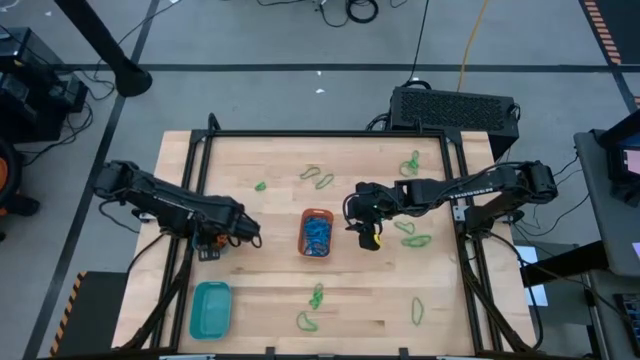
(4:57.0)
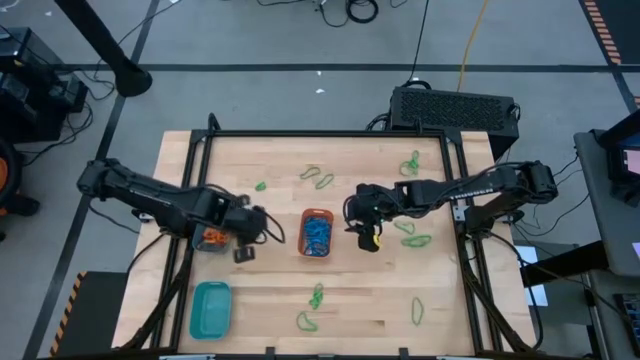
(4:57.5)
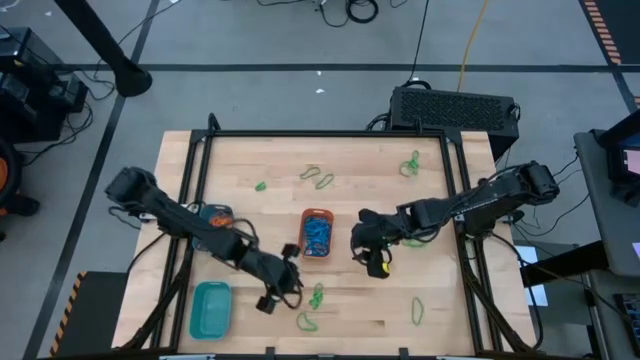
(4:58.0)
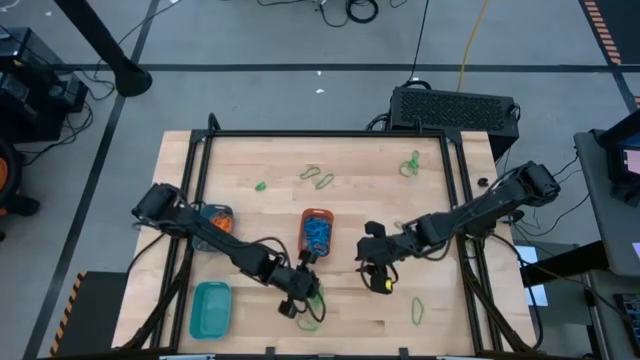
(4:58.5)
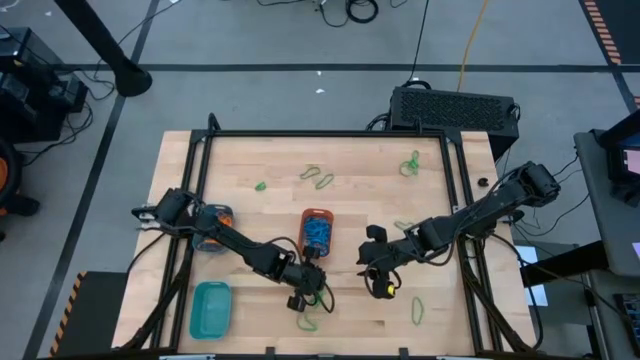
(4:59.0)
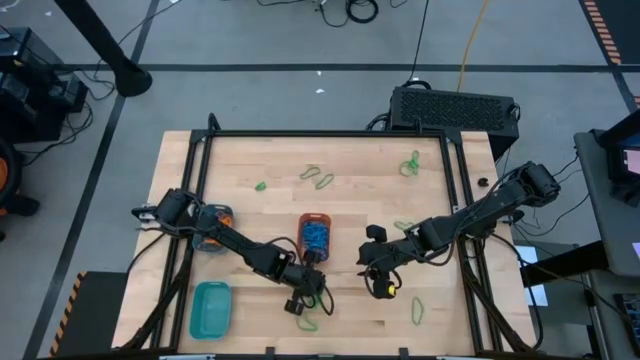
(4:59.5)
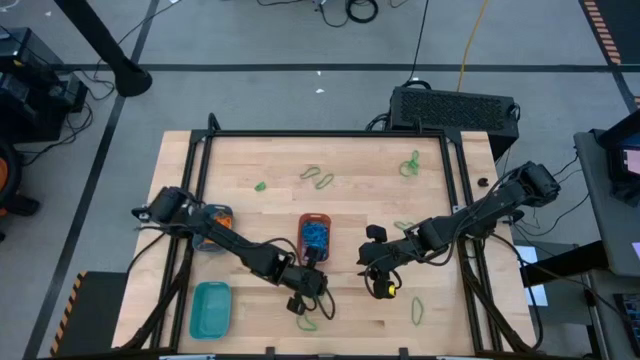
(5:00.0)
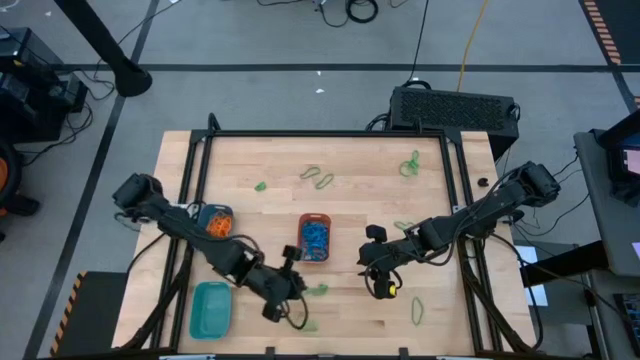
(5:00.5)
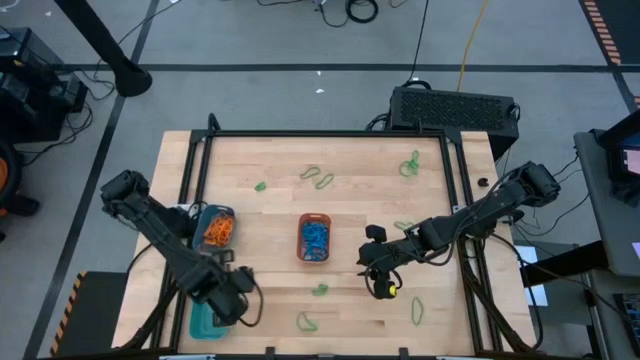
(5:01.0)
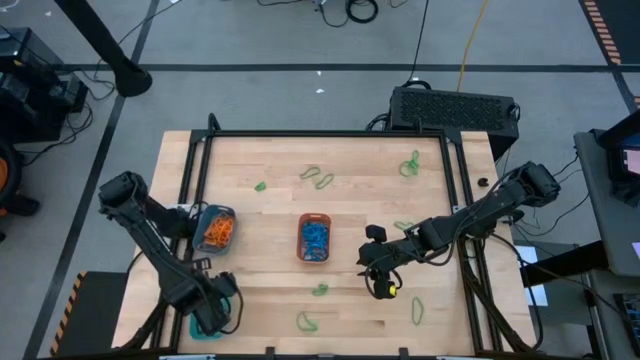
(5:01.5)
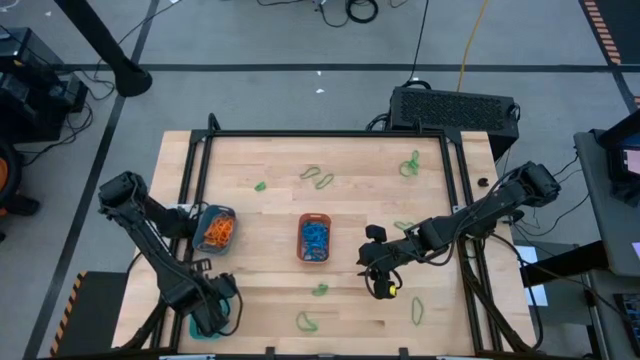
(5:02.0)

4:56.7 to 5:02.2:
Task: Sort rubber bands into baskets
Put the green rubber band into the green bin

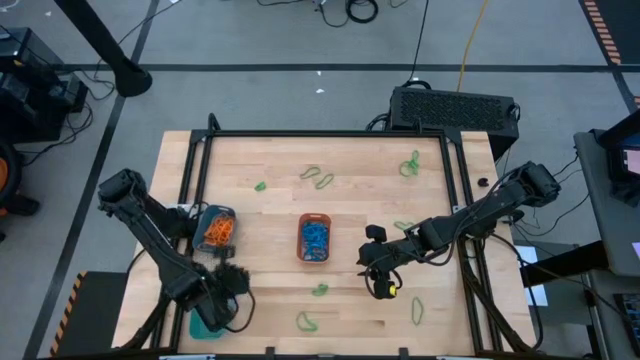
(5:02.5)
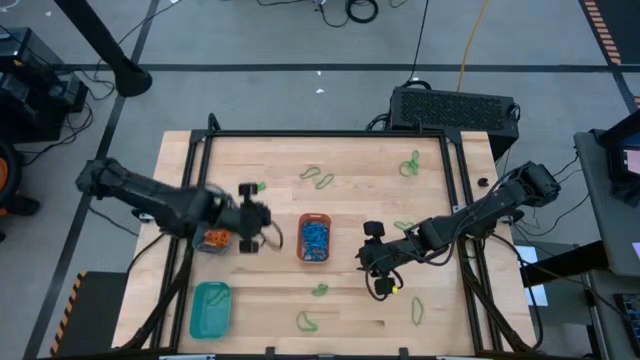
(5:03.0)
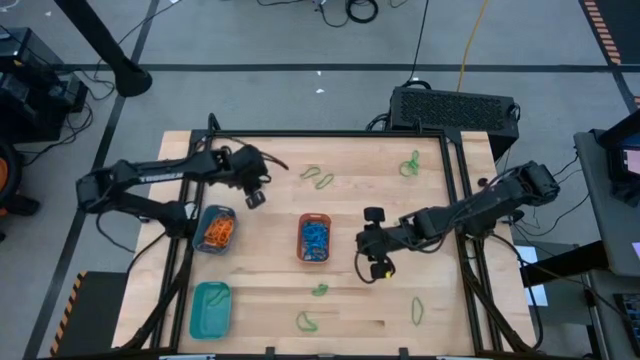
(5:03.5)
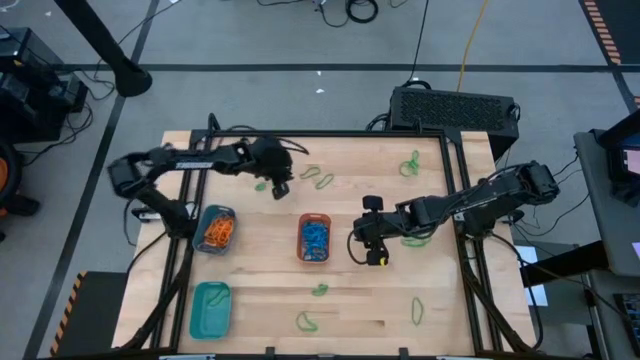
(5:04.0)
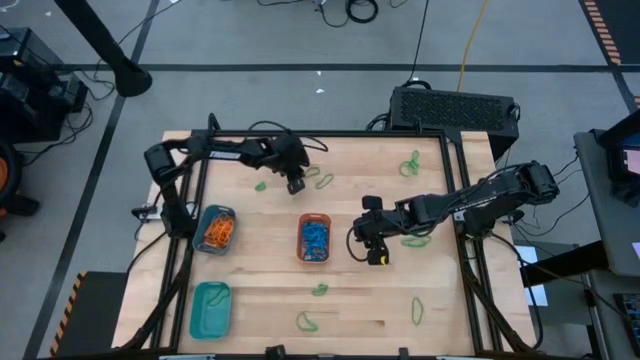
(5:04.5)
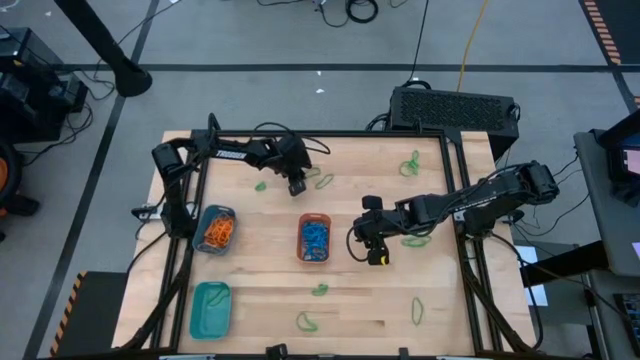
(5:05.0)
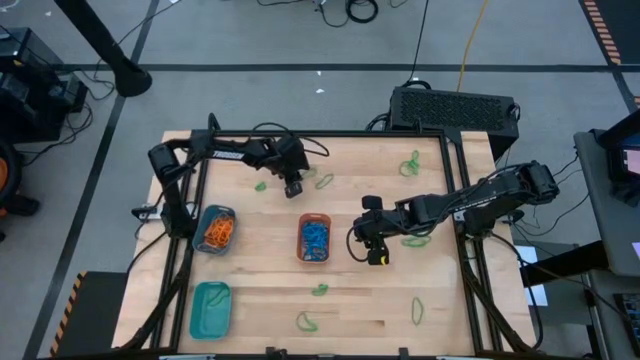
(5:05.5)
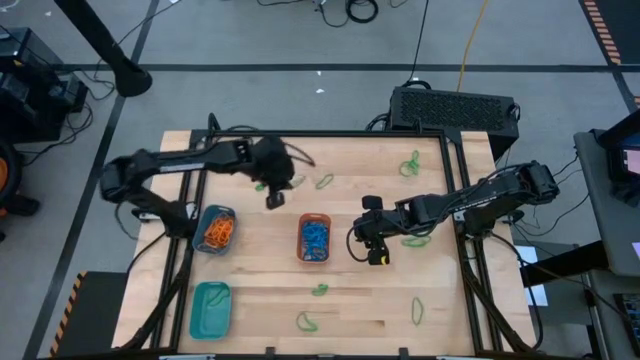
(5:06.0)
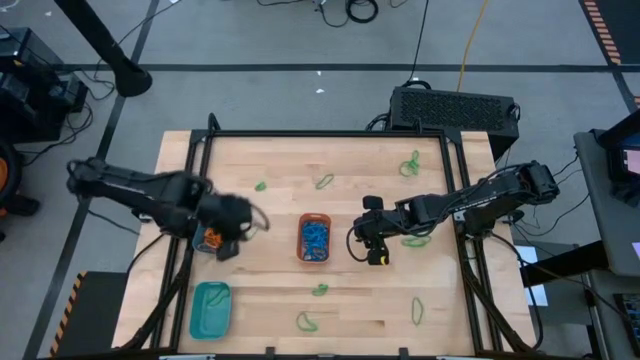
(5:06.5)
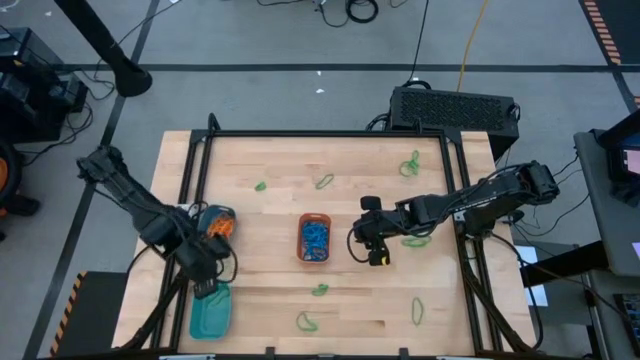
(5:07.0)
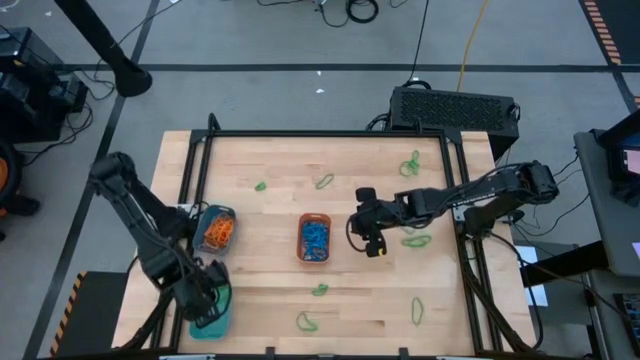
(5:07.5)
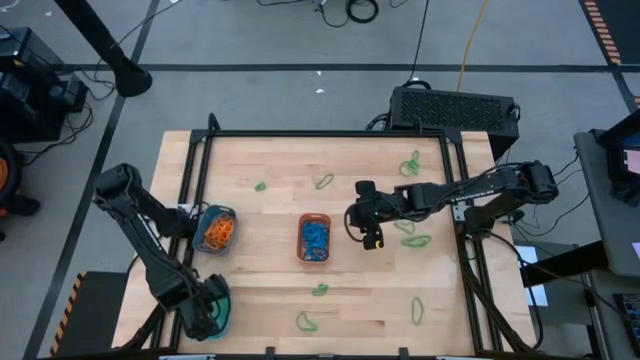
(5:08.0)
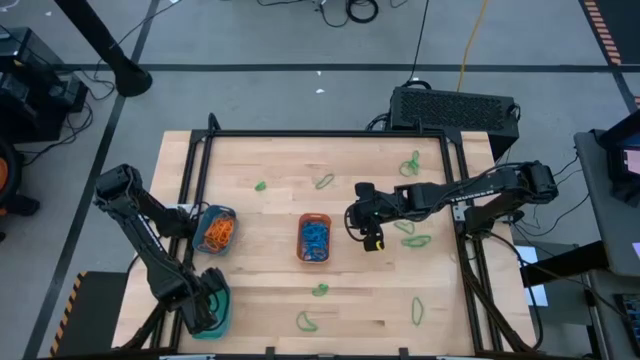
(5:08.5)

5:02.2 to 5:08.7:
Put the green rubber band into the green bin

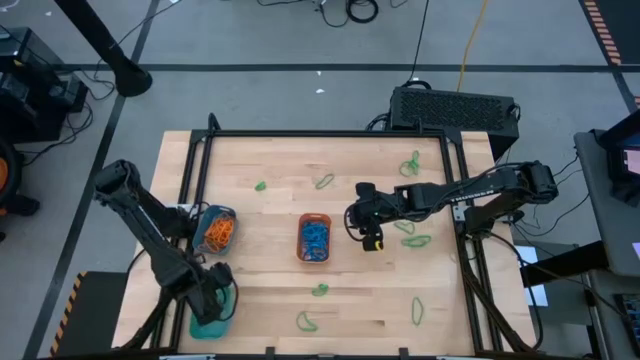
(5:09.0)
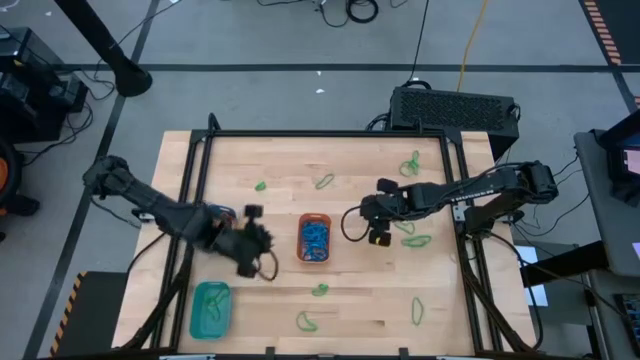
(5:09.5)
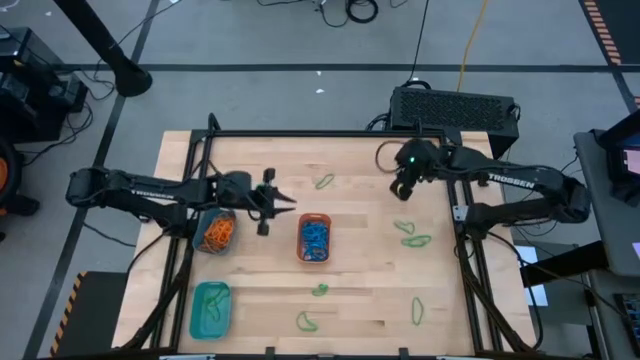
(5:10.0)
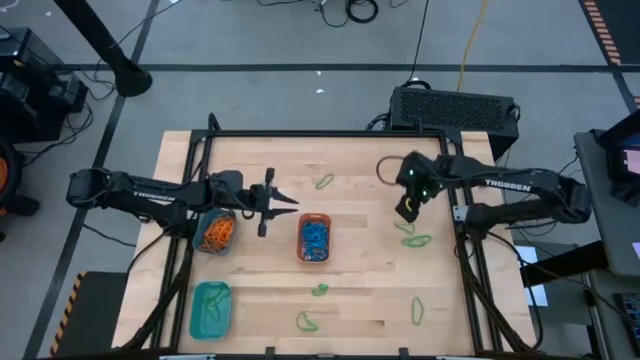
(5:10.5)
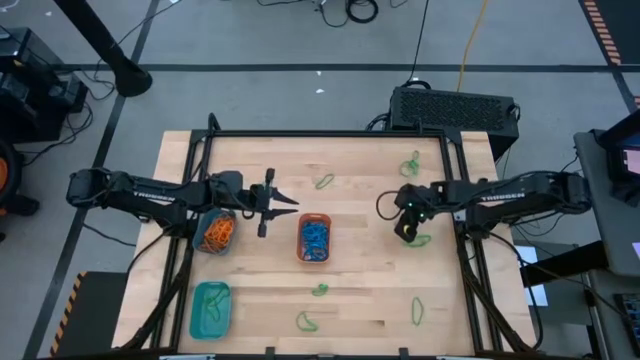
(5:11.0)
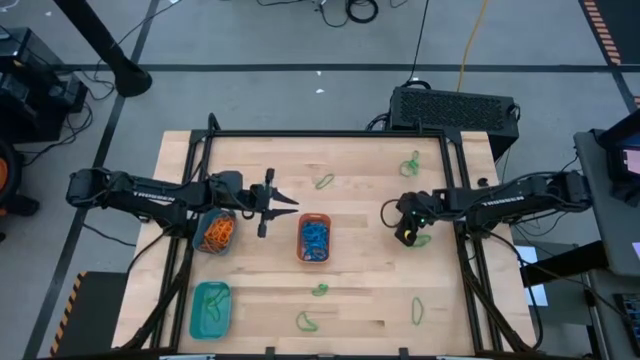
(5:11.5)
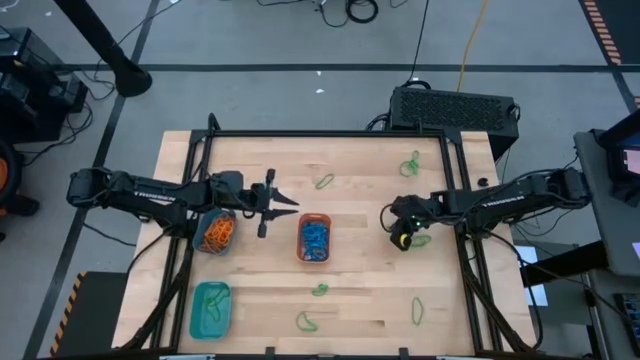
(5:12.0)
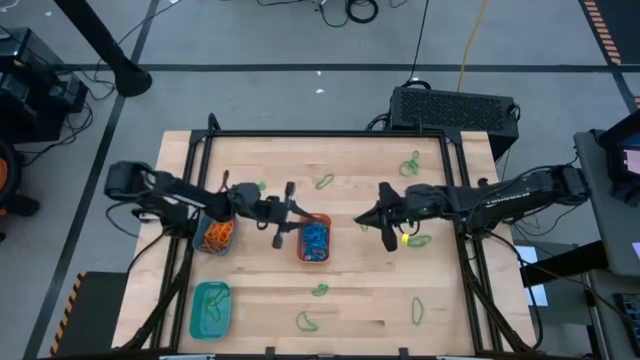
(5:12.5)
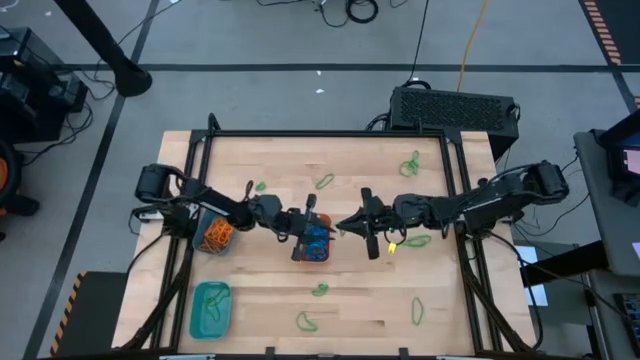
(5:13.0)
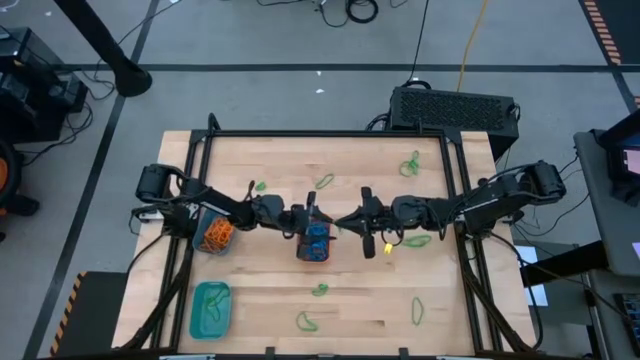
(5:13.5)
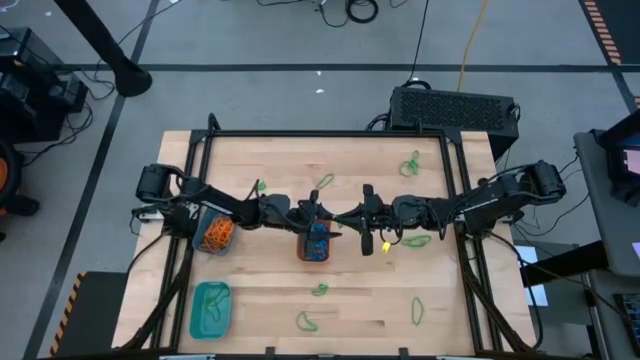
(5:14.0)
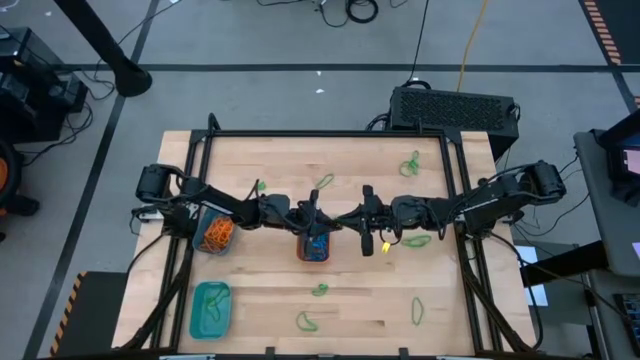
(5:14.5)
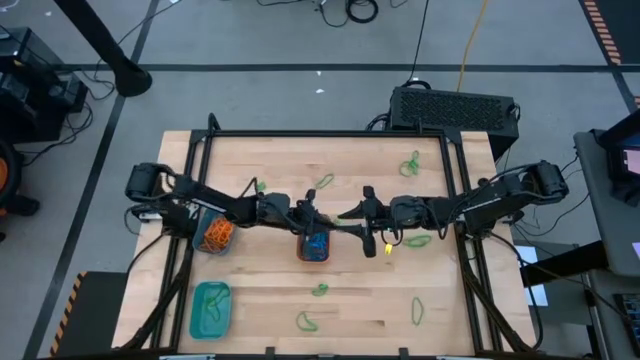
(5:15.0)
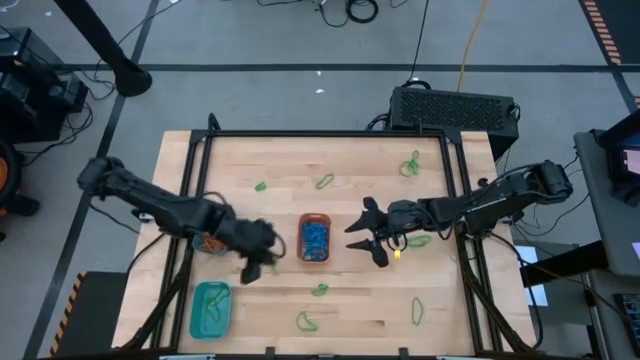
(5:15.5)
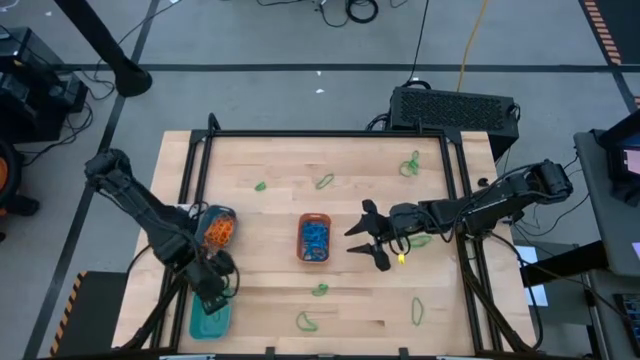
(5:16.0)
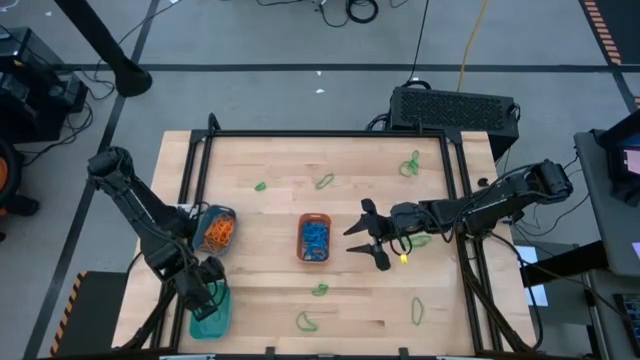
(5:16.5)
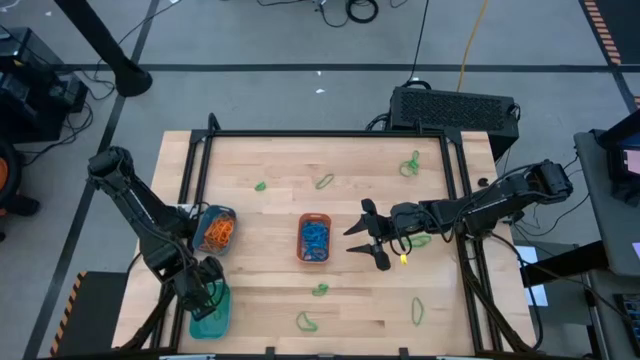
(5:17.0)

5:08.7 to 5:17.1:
Put the green rubber band into the green bin
